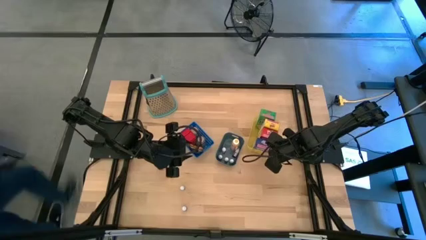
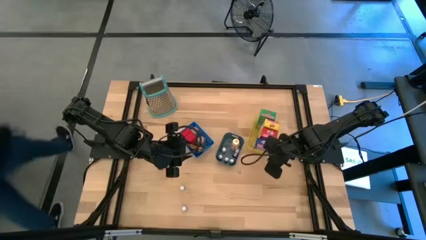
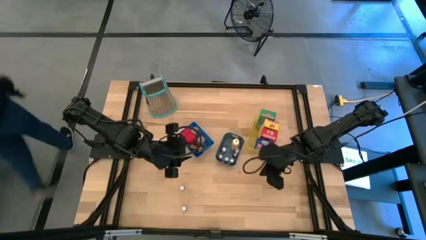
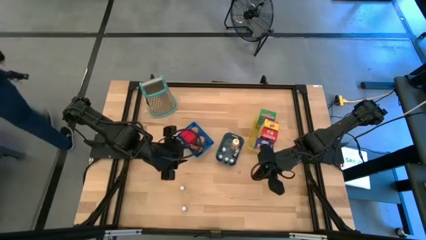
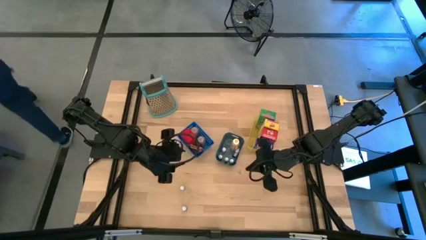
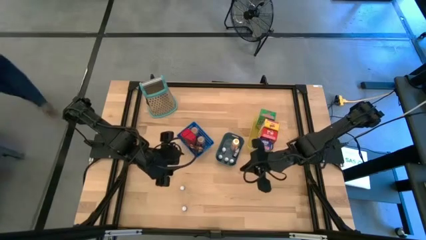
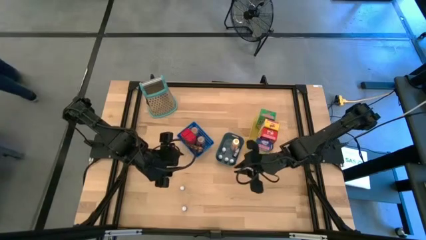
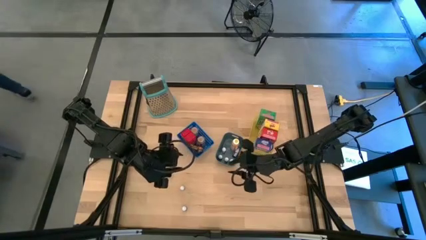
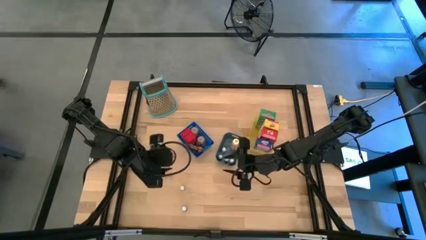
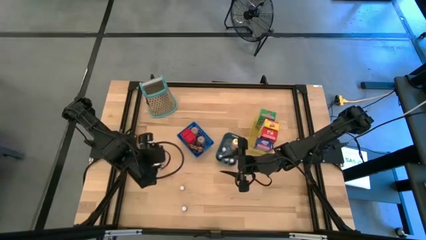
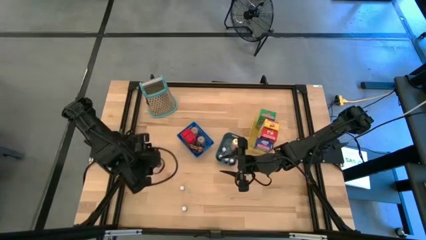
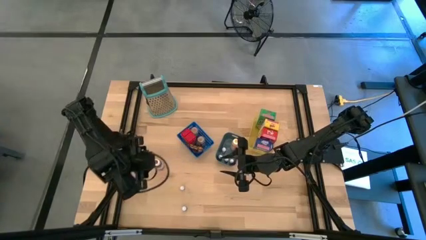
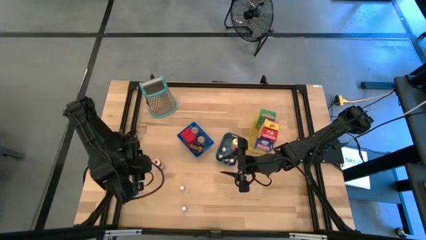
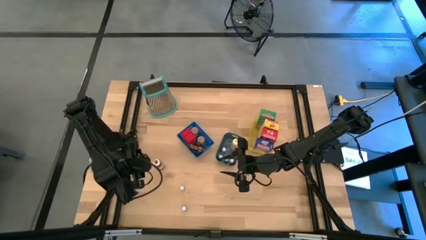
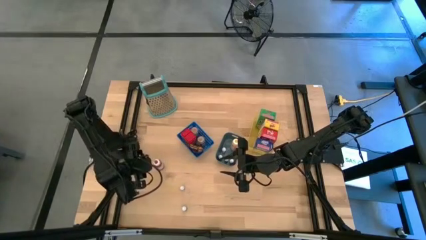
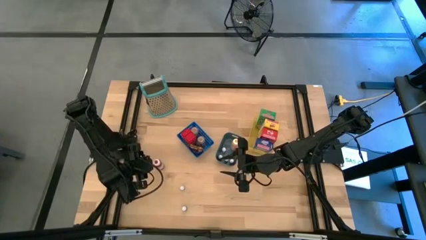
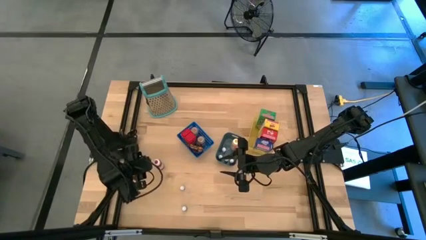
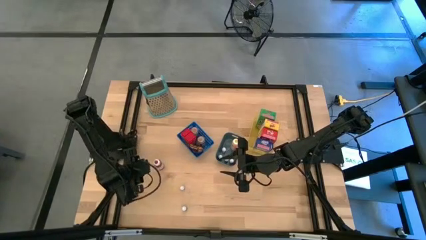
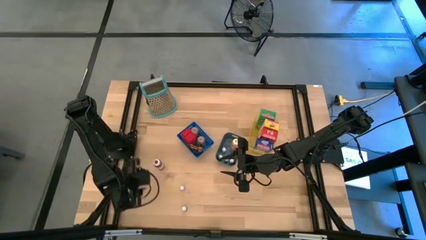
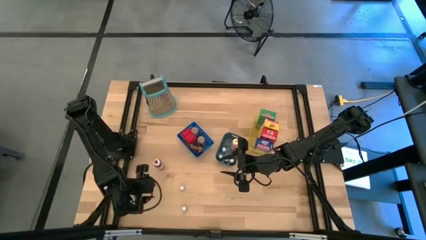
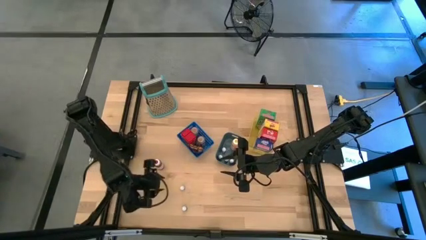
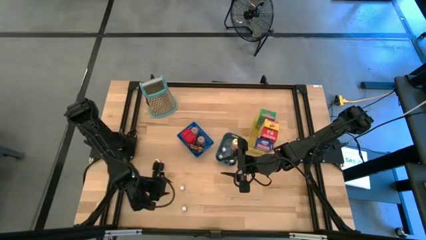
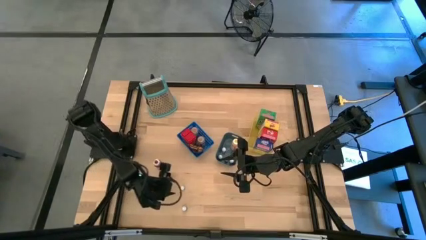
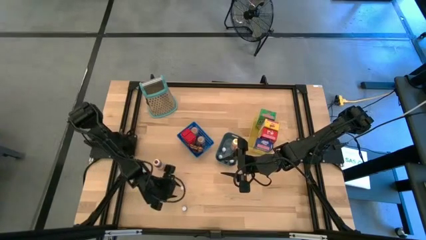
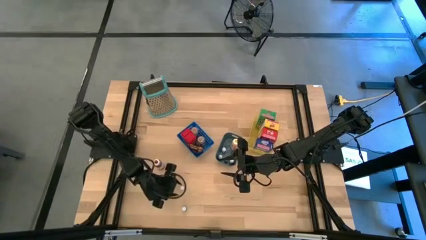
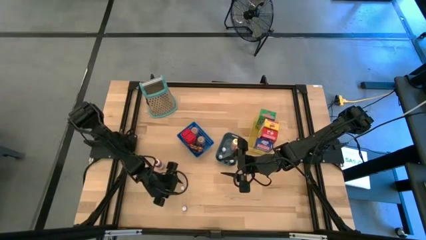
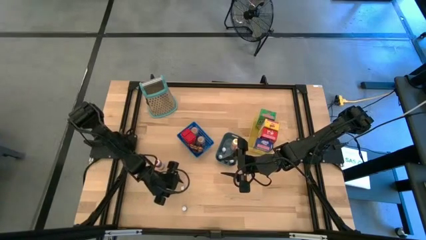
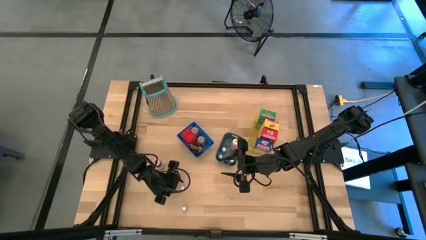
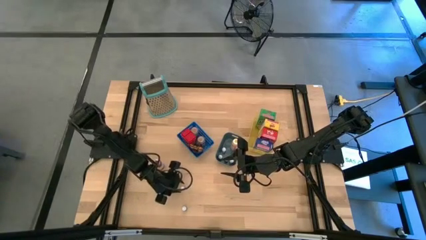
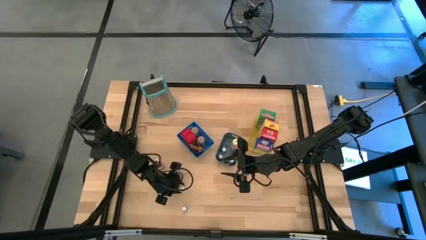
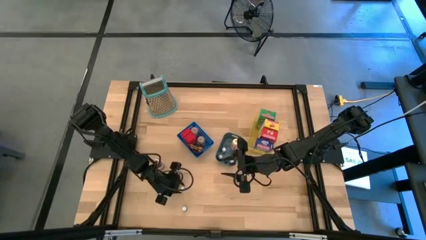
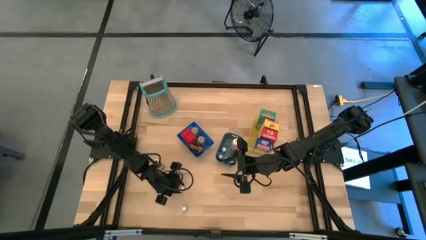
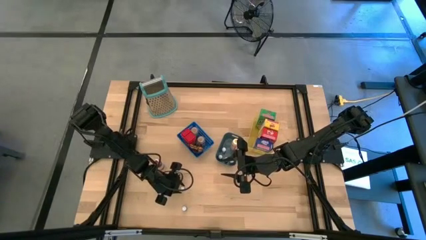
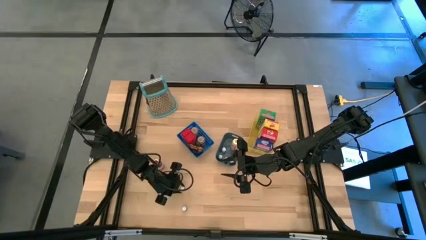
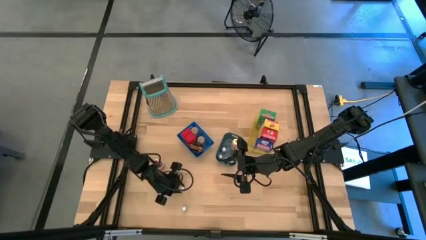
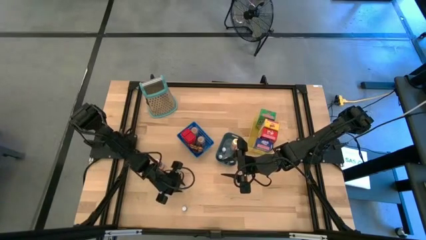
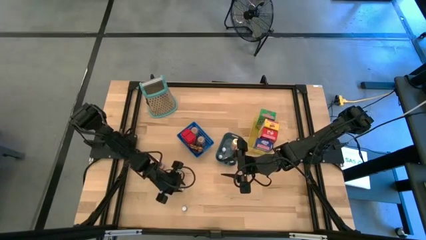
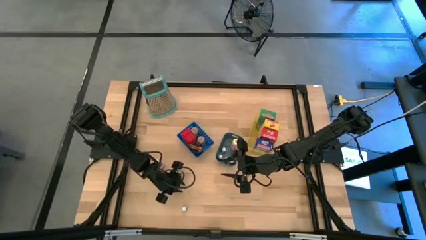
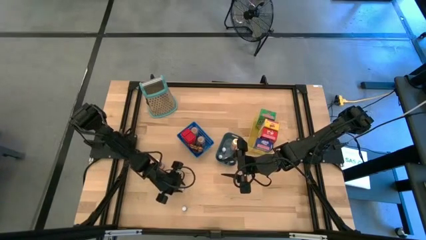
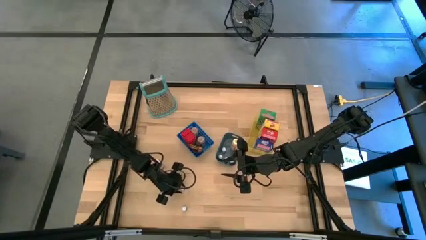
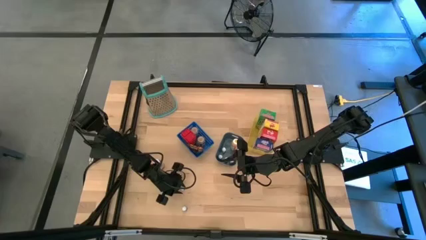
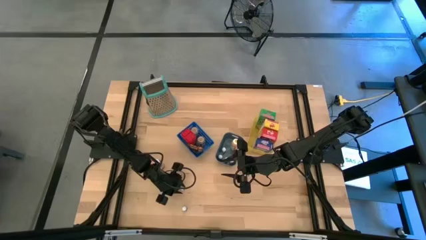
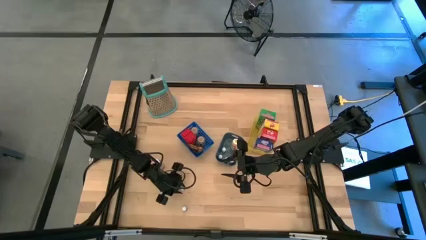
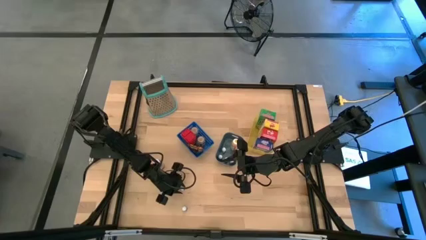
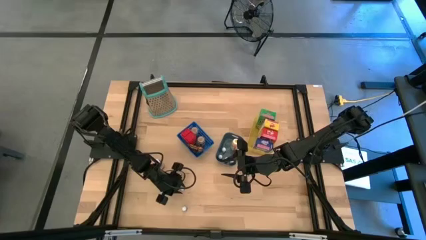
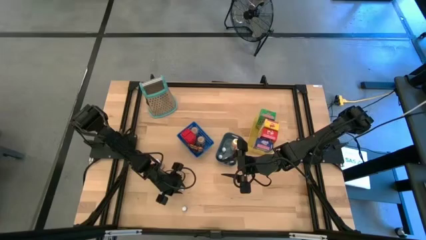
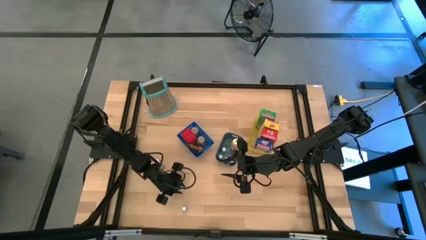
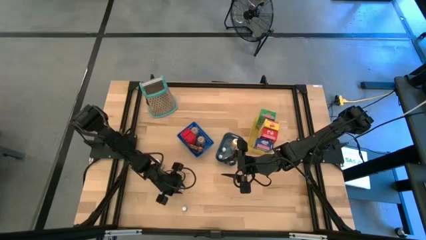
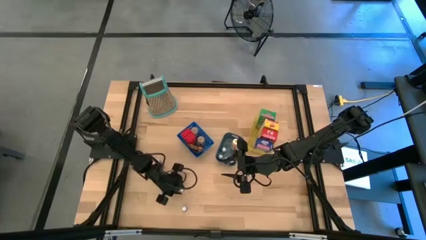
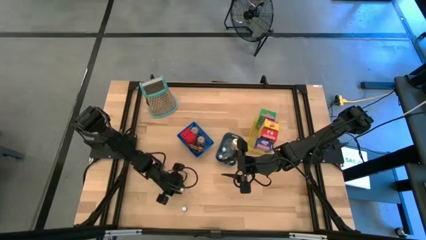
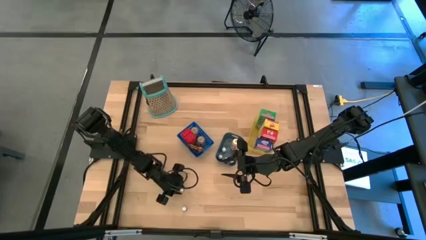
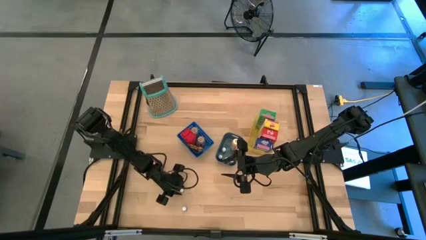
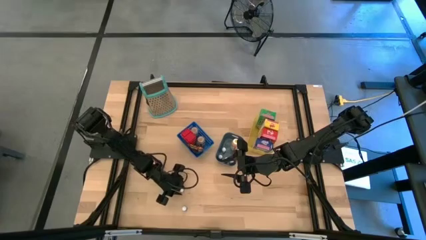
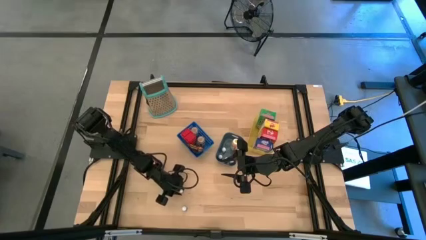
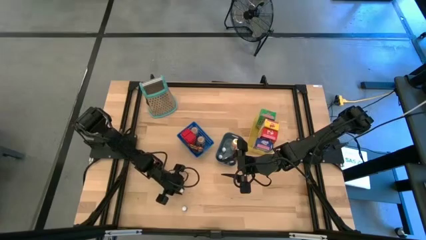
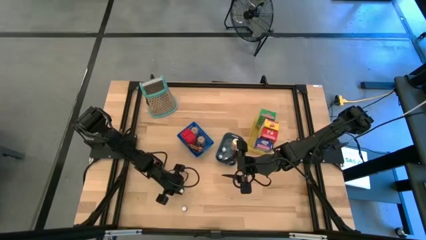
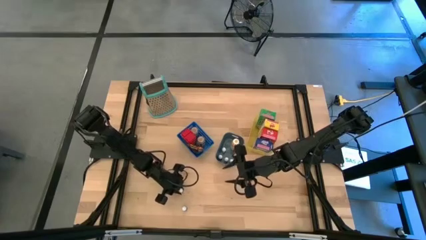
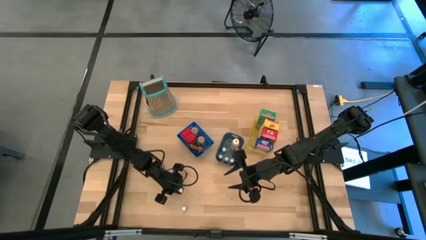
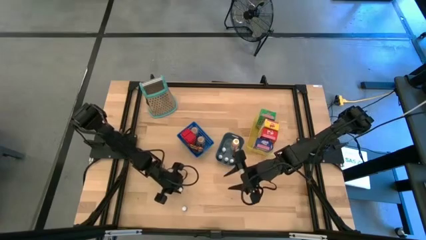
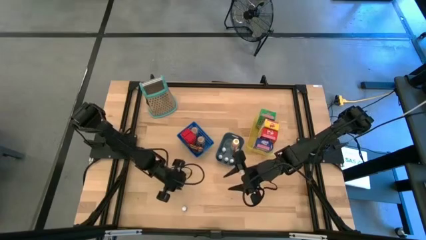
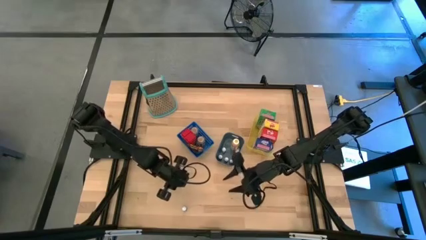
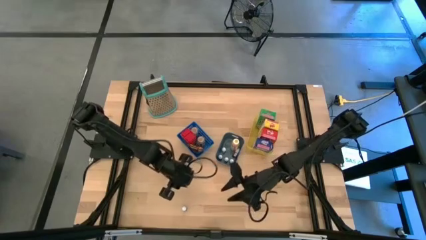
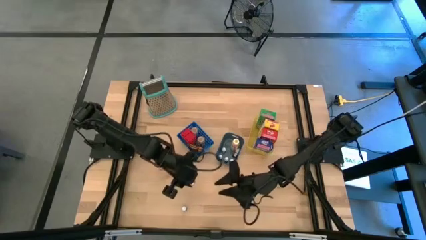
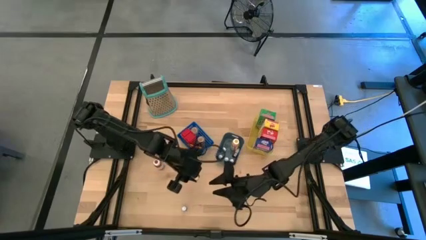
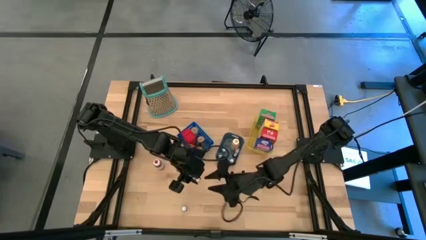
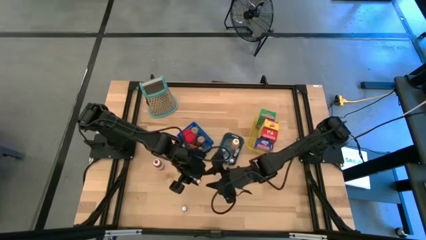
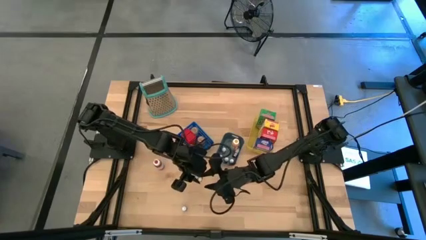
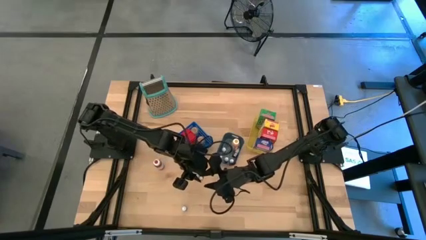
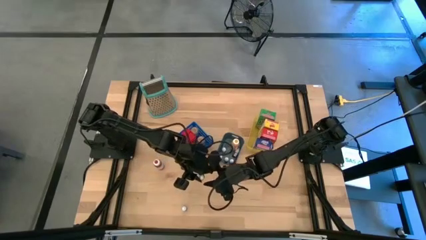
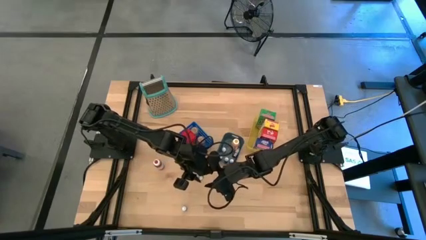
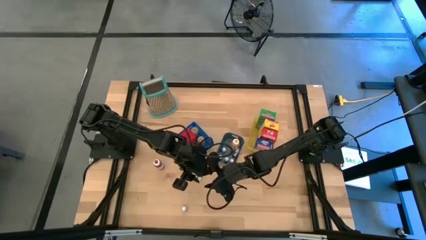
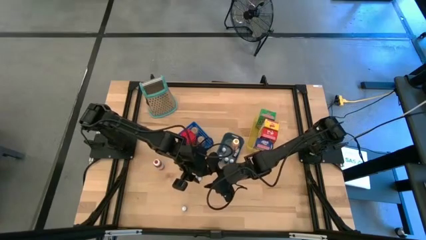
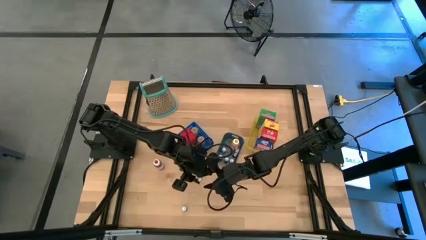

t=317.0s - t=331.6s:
Task: Pick & Place Kitchen Items
Put the black food coloring bottle into the green bin
